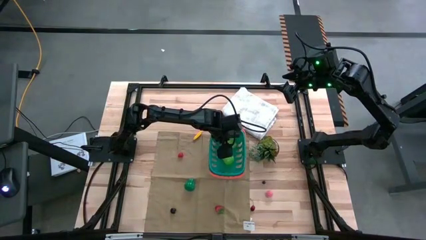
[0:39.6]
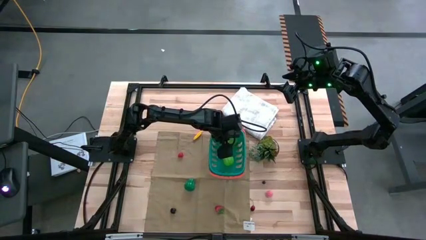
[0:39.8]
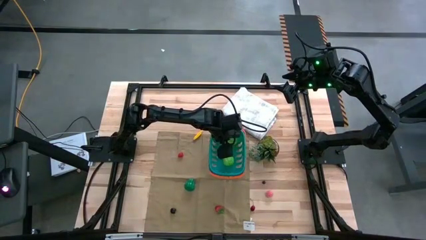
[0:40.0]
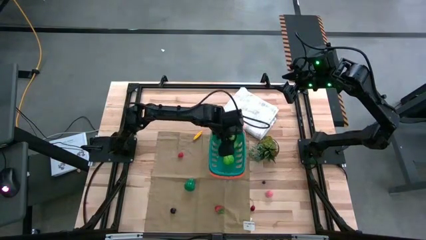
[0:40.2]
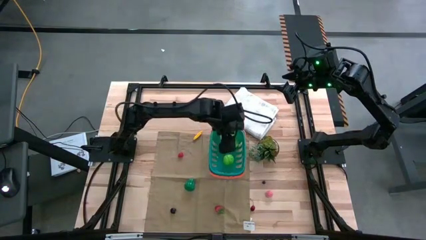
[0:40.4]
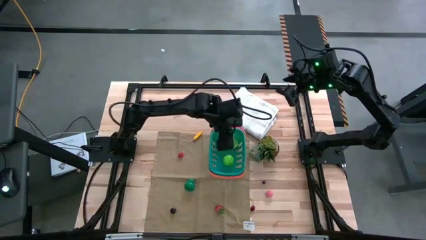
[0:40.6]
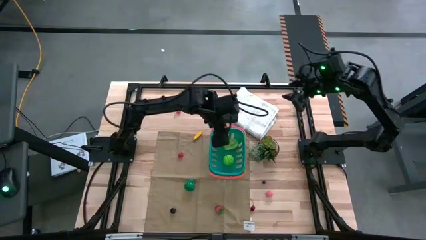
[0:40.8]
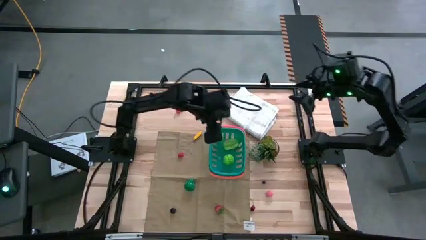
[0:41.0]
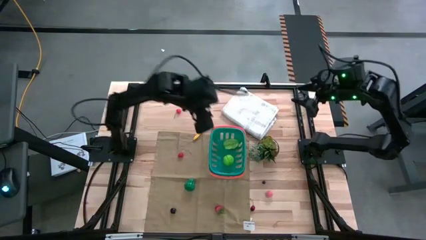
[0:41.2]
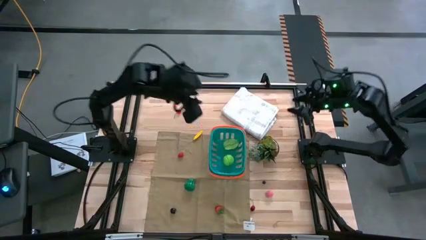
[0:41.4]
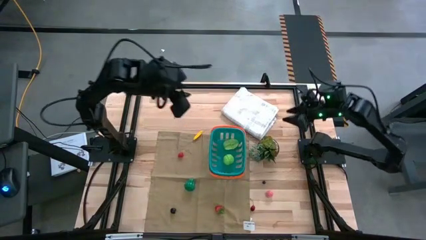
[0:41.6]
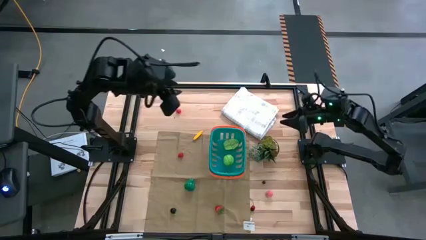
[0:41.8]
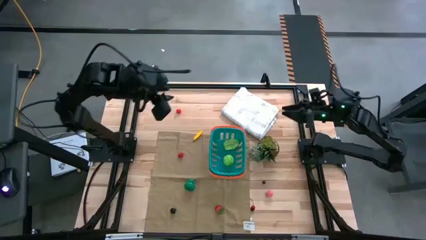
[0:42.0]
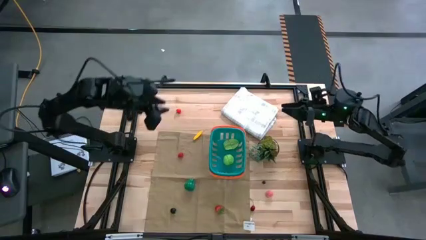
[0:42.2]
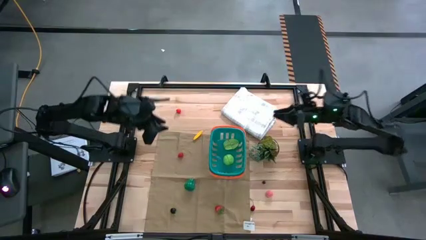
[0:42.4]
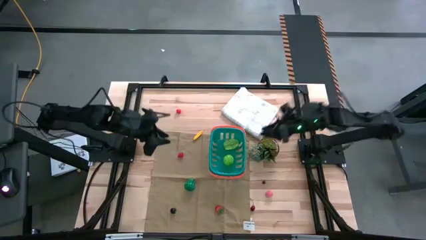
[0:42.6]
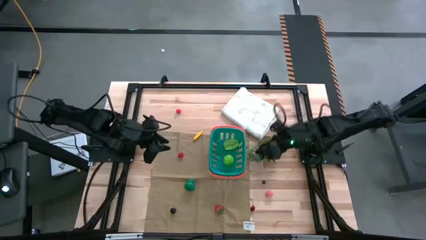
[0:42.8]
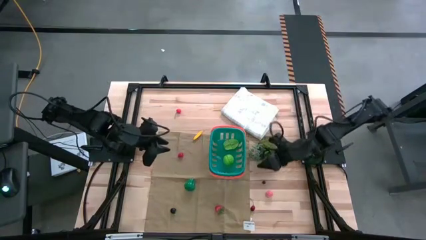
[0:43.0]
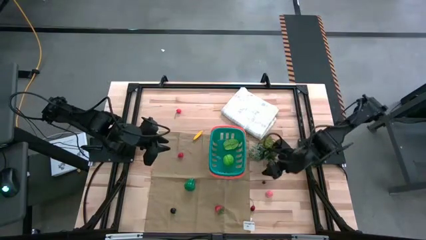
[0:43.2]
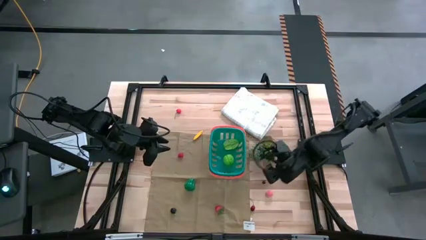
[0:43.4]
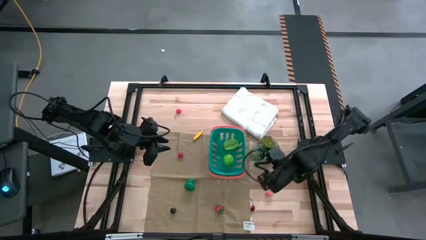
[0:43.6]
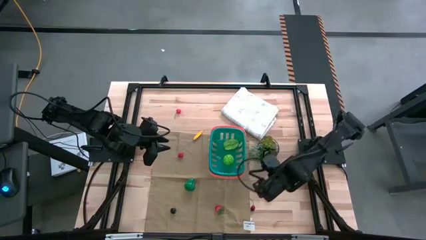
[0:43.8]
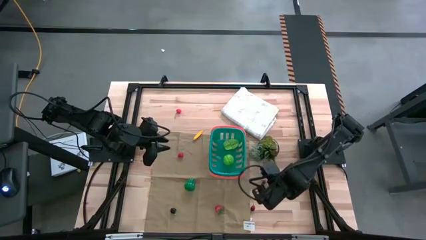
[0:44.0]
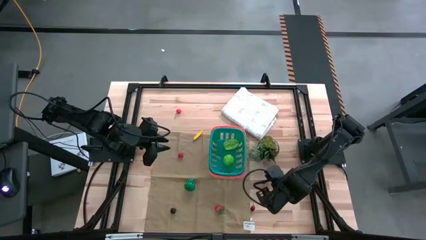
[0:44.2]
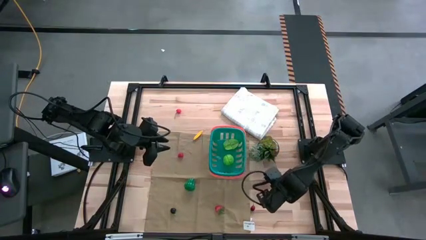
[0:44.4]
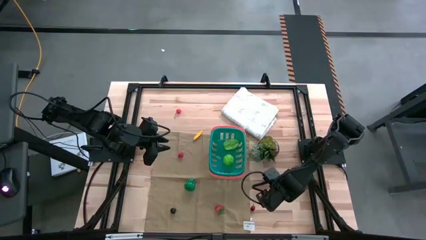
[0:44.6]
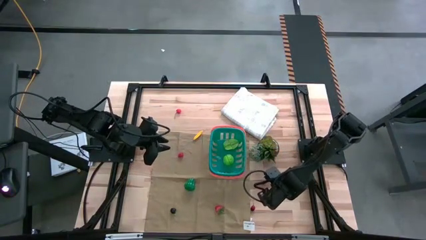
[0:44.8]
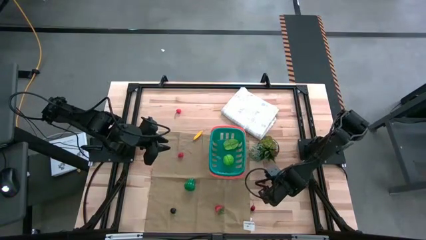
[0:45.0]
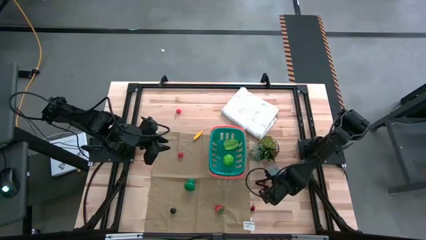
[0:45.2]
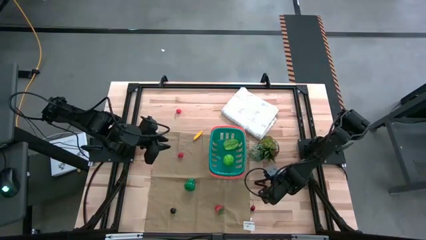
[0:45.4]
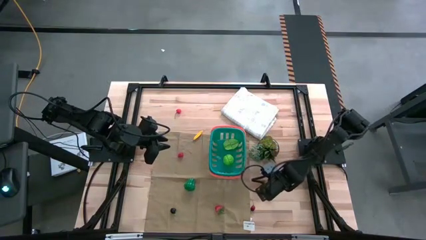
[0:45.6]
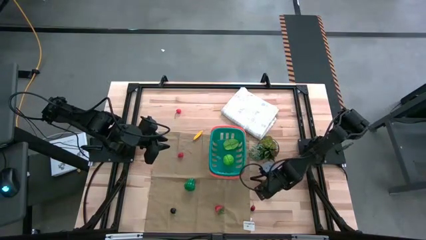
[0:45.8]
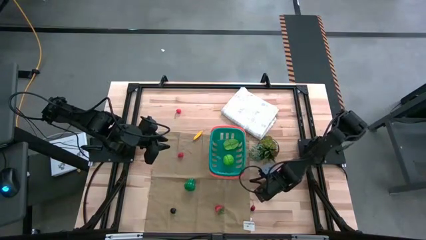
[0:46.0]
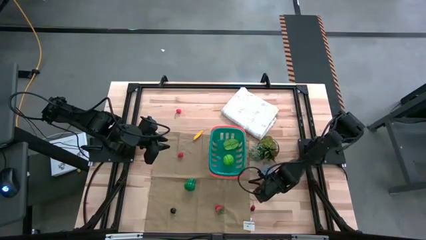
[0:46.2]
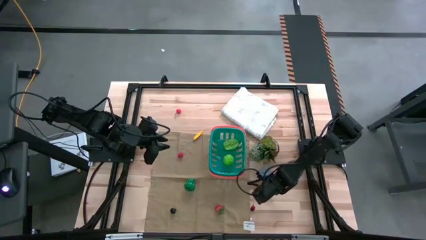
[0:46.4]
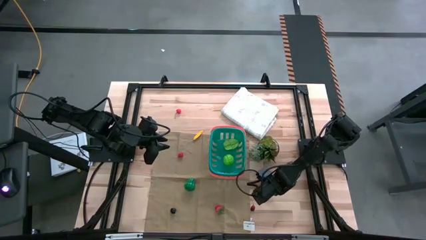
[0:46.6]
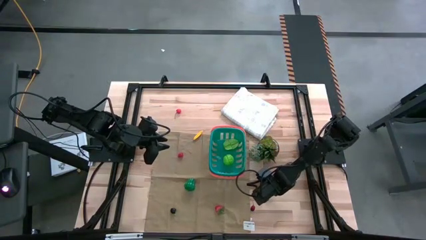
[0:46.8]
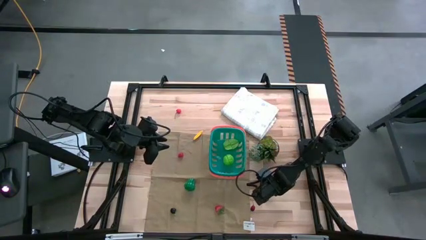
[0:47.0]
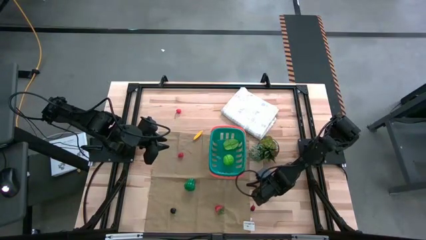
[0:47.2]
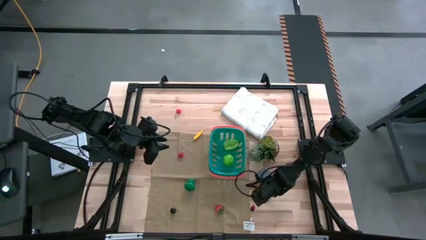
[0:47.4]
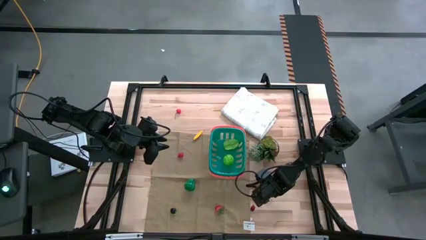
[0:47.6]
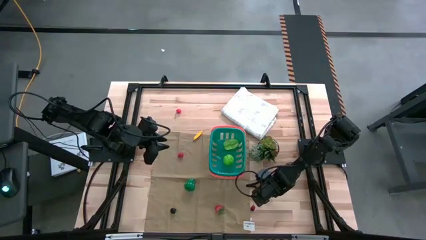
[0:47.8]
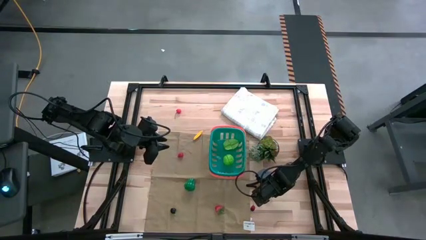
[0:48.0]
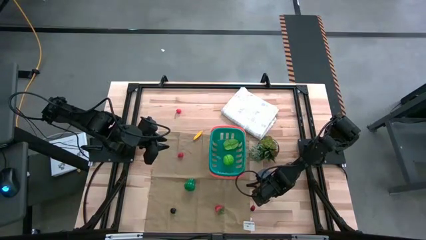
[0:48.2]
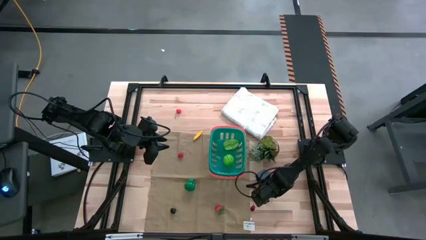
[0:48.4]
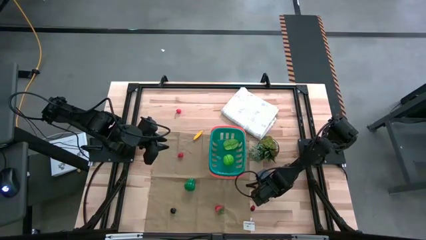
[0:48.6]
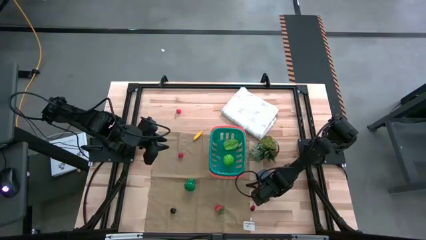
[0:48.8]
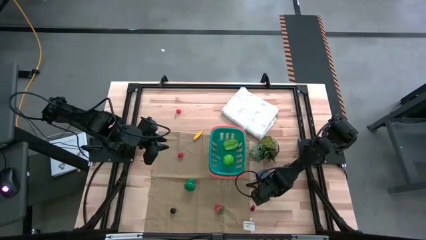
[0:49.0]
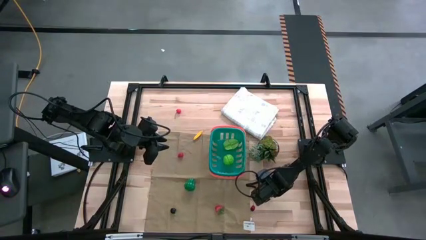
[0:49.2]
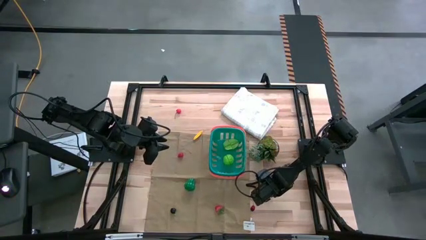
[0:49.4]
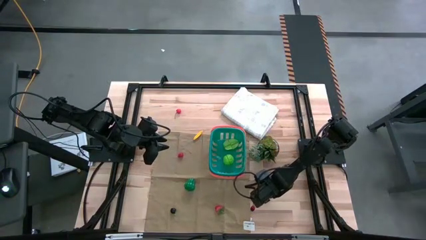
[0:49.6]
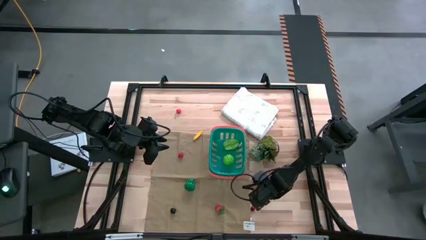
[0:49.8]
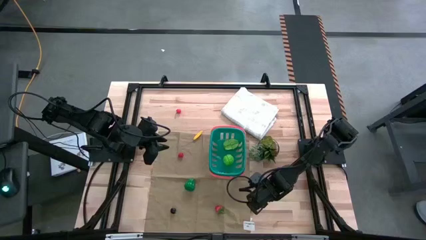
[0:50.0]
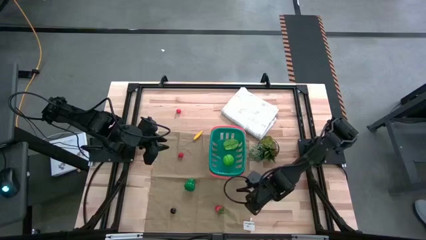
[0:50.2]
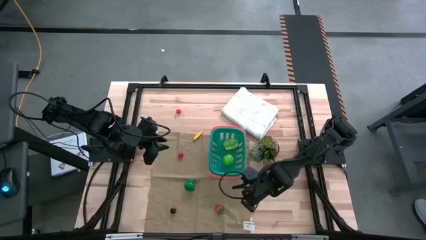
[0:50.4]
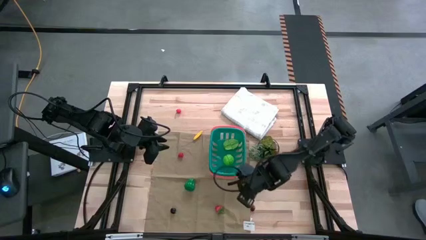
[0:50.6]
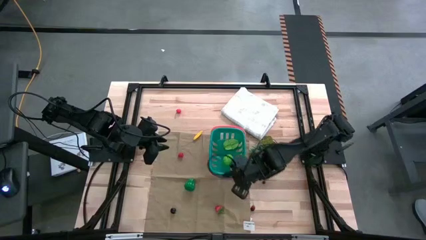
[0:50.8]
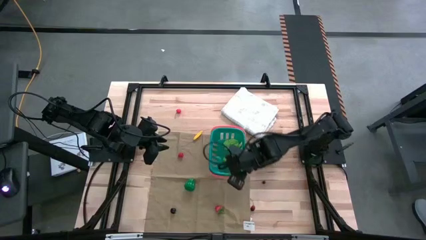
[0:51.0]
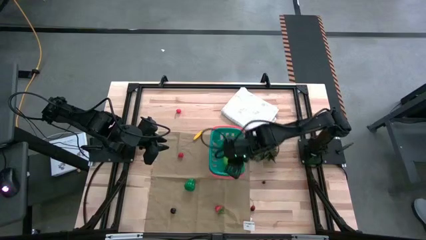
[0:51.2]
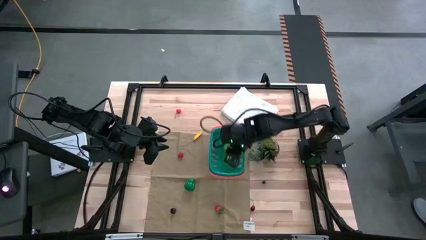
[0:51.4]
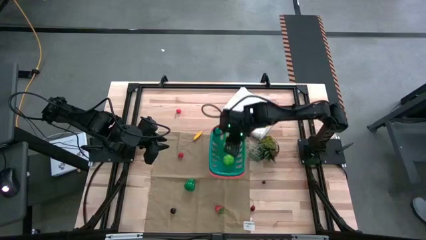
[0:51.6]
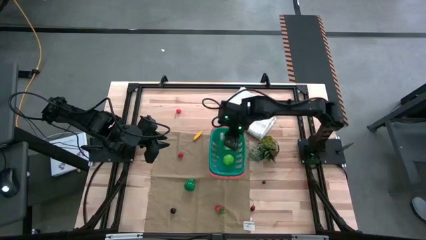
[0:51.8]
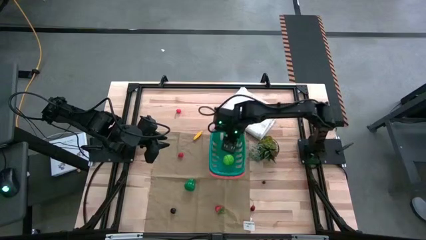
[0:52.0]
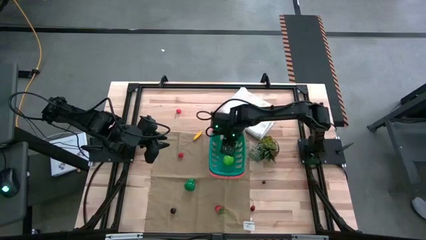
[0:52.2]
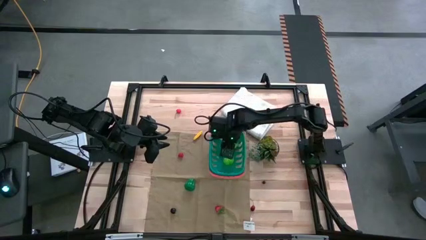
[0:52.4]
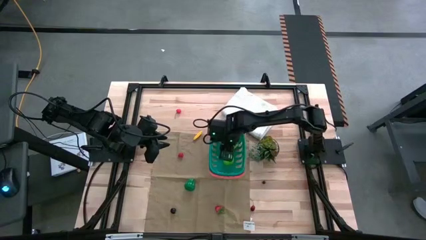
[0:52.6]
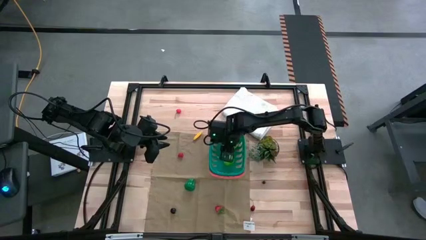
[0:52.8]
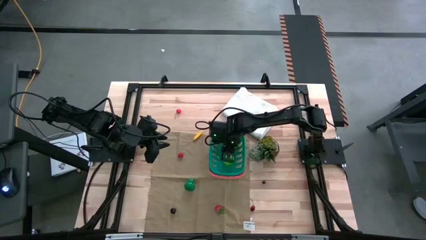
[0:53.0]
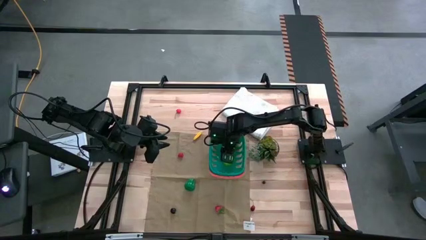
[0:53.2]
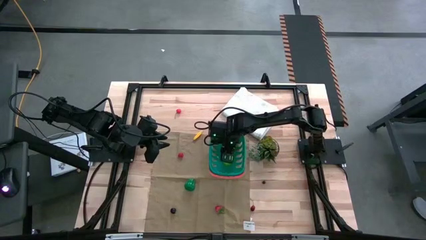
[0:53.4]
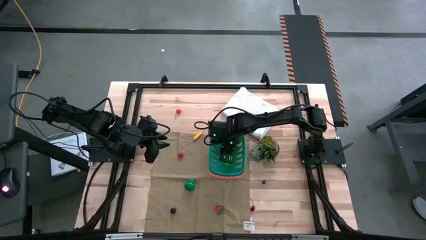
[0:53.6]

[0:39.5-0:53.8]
Task: Pick and placing Produce into tupperware
Put the pink peach into the blue basket
